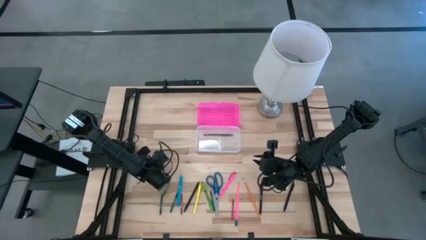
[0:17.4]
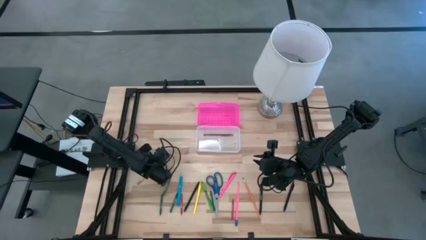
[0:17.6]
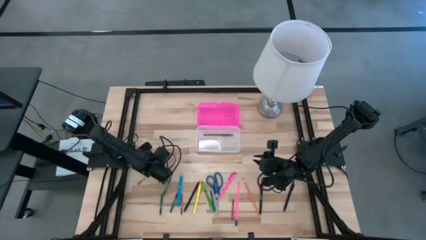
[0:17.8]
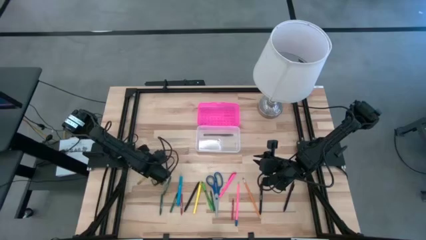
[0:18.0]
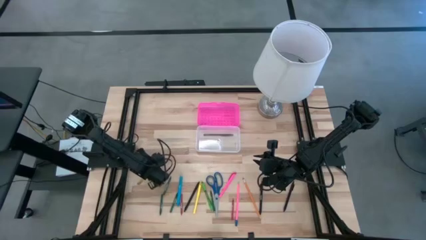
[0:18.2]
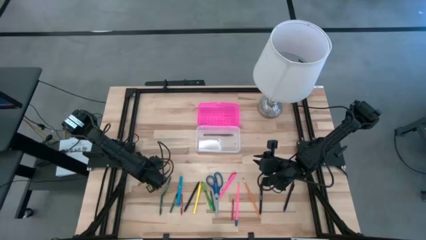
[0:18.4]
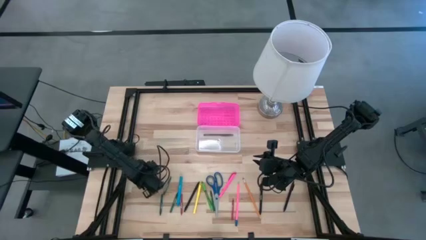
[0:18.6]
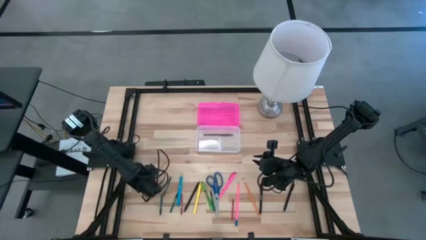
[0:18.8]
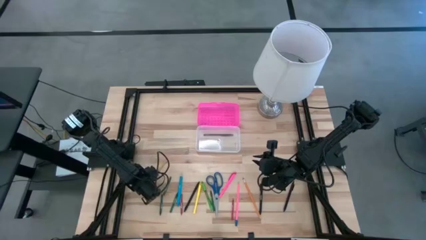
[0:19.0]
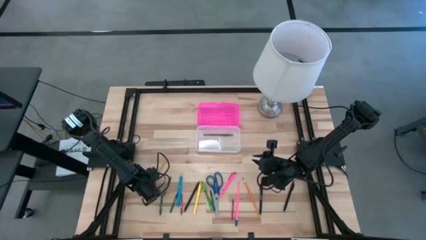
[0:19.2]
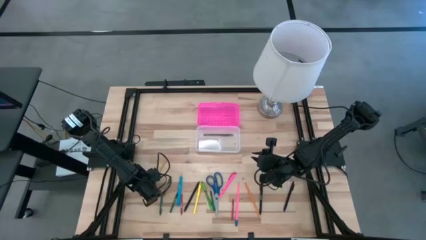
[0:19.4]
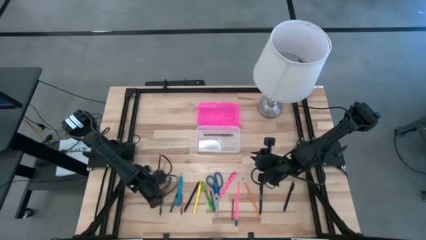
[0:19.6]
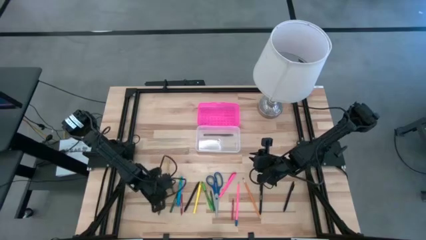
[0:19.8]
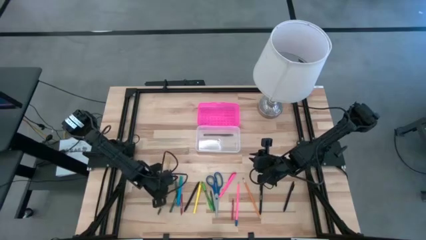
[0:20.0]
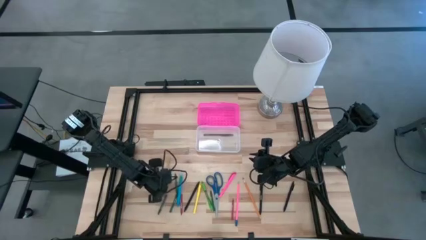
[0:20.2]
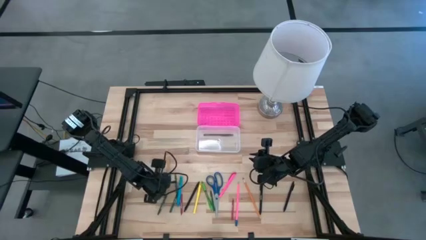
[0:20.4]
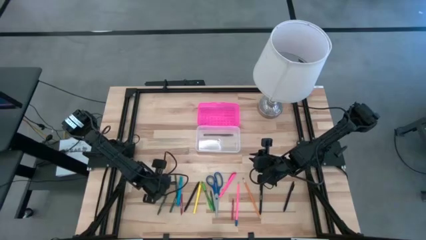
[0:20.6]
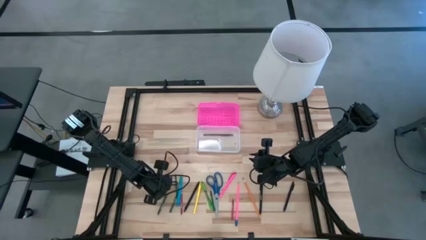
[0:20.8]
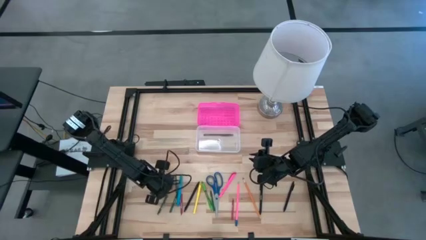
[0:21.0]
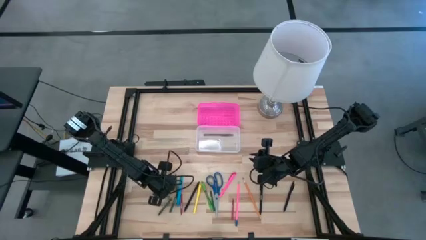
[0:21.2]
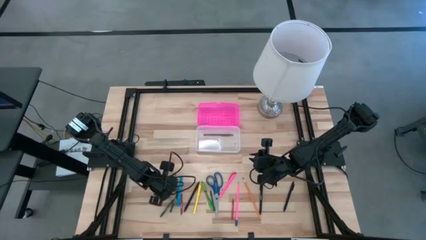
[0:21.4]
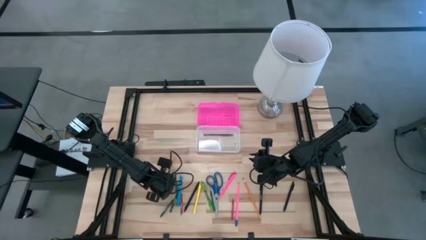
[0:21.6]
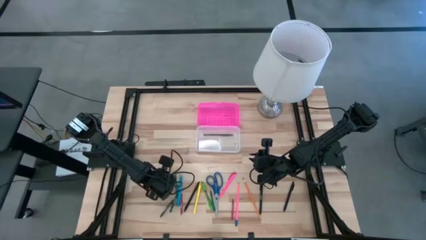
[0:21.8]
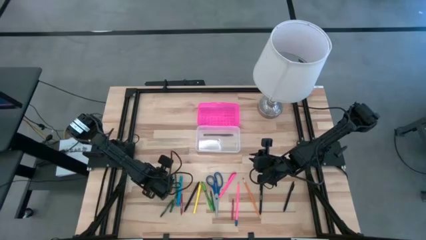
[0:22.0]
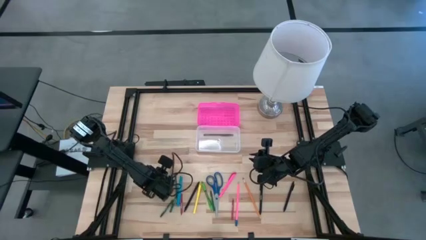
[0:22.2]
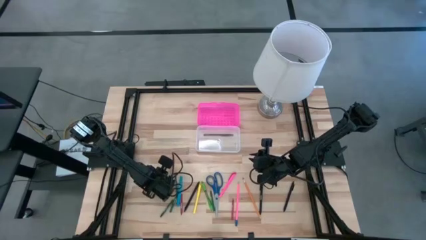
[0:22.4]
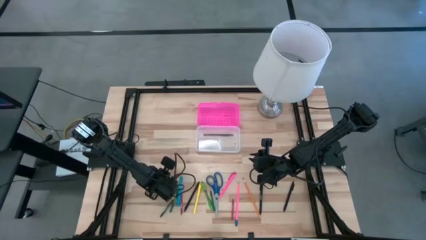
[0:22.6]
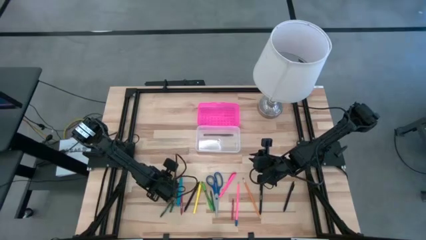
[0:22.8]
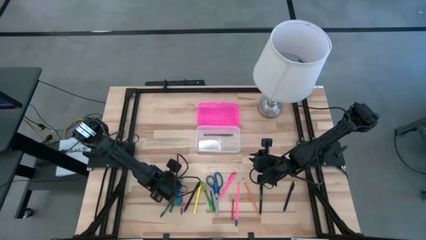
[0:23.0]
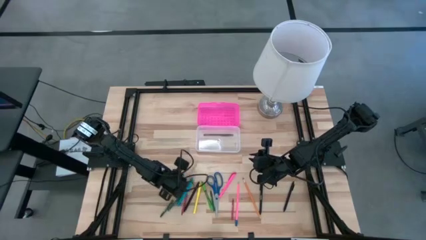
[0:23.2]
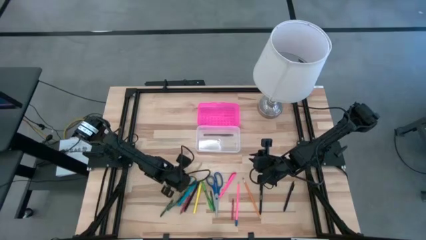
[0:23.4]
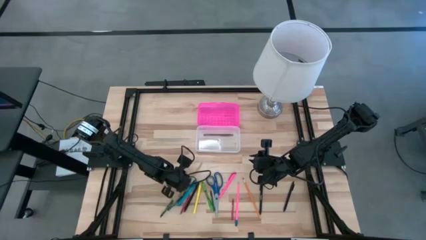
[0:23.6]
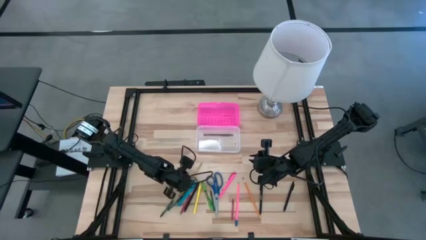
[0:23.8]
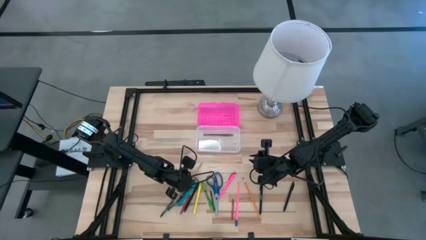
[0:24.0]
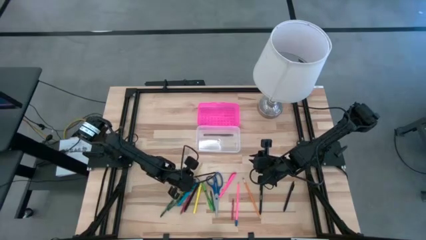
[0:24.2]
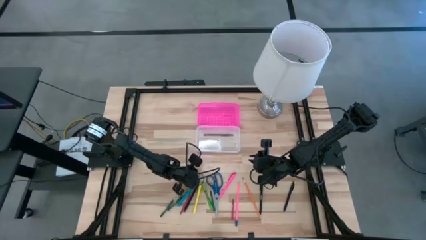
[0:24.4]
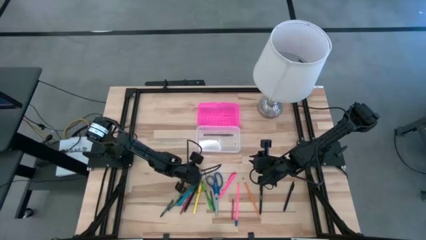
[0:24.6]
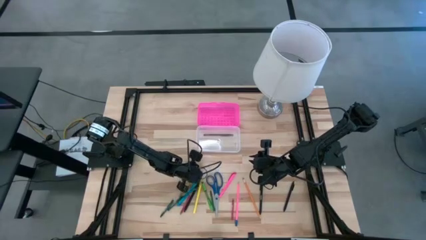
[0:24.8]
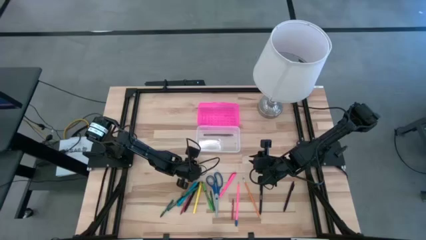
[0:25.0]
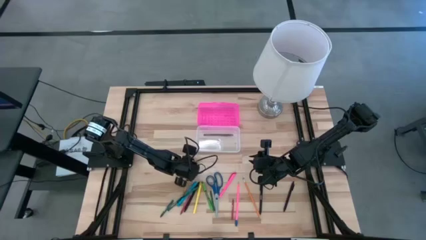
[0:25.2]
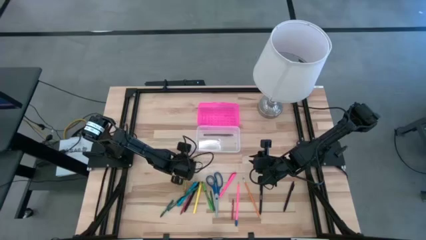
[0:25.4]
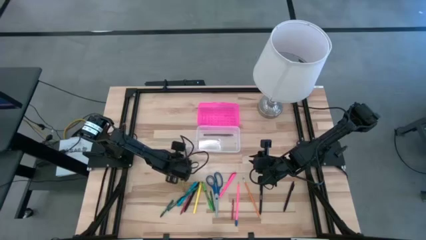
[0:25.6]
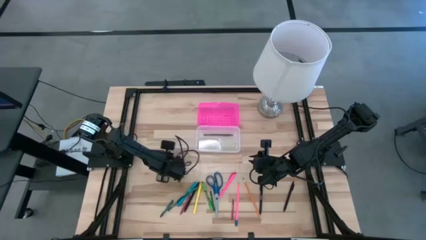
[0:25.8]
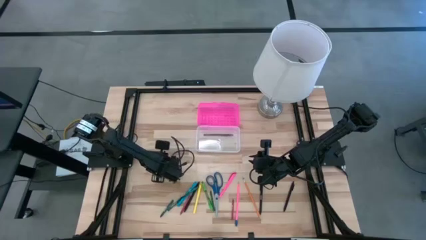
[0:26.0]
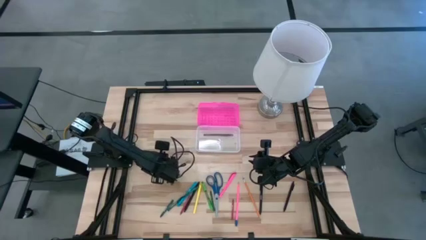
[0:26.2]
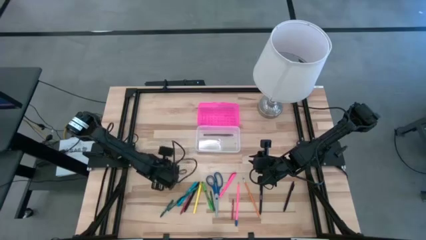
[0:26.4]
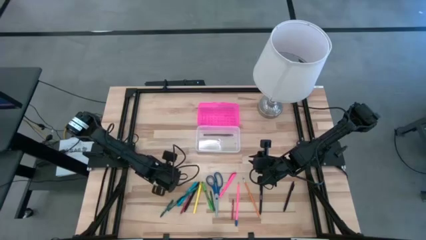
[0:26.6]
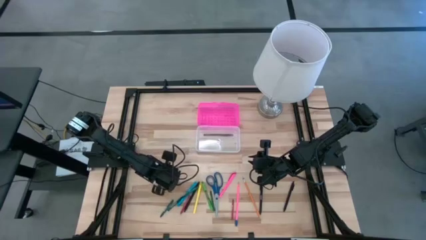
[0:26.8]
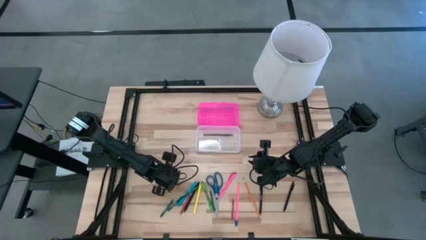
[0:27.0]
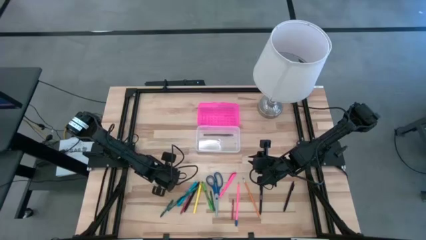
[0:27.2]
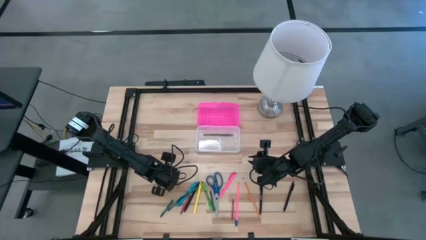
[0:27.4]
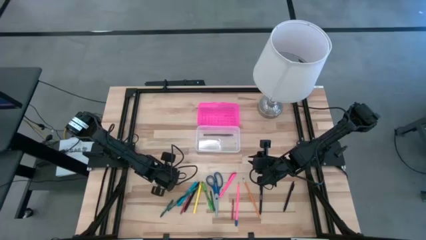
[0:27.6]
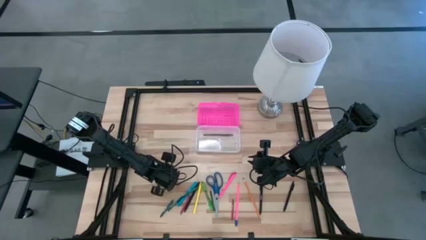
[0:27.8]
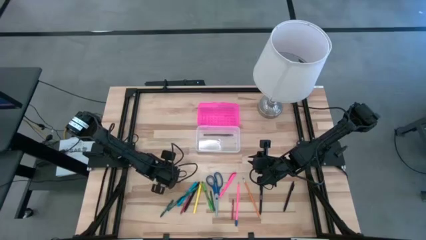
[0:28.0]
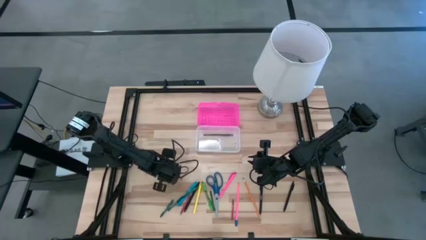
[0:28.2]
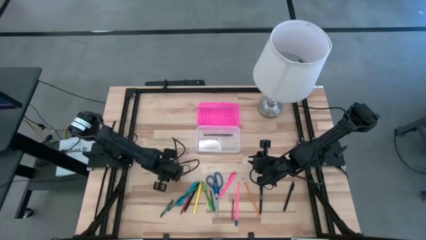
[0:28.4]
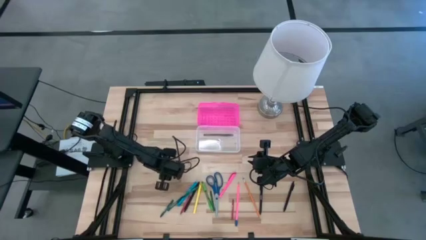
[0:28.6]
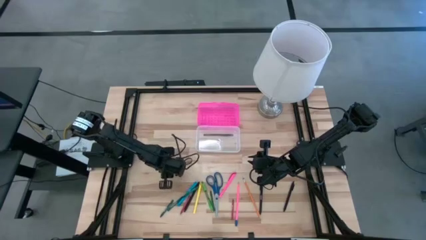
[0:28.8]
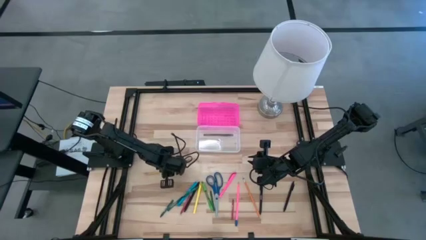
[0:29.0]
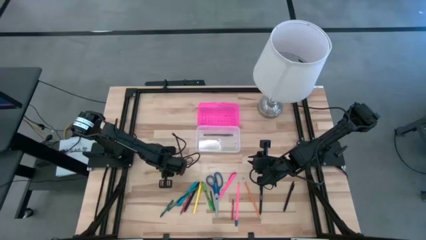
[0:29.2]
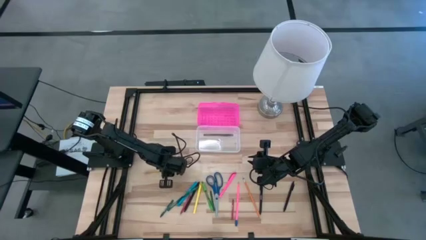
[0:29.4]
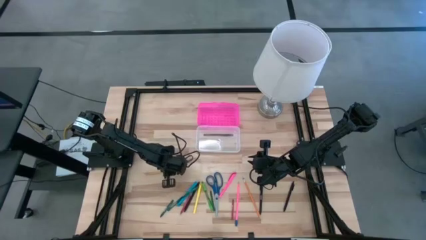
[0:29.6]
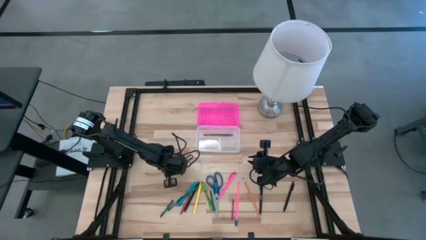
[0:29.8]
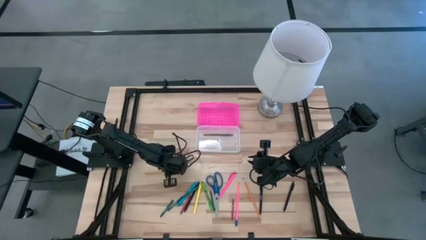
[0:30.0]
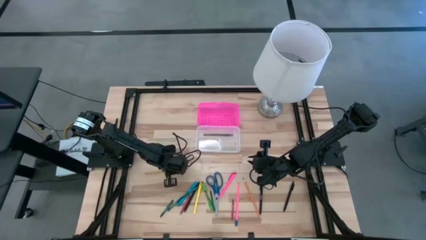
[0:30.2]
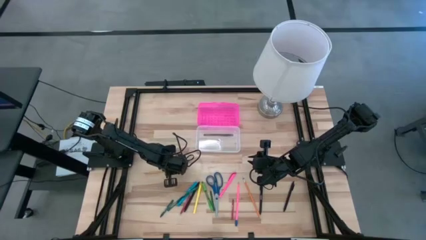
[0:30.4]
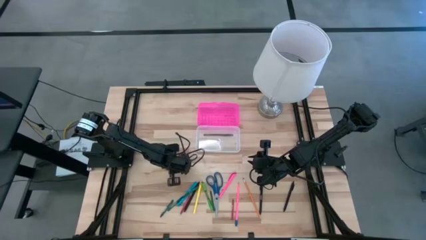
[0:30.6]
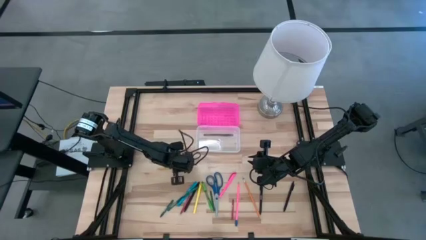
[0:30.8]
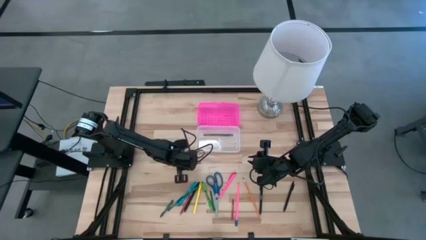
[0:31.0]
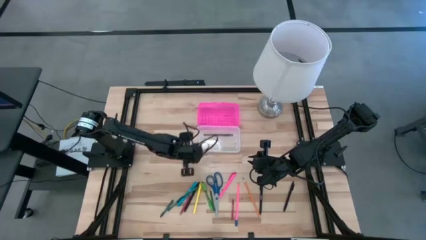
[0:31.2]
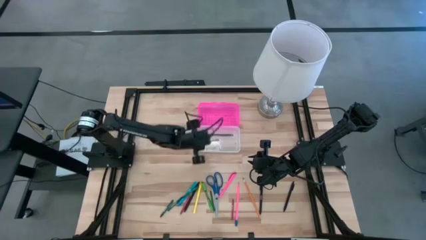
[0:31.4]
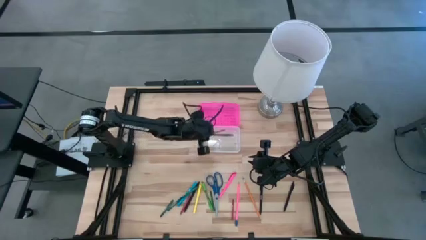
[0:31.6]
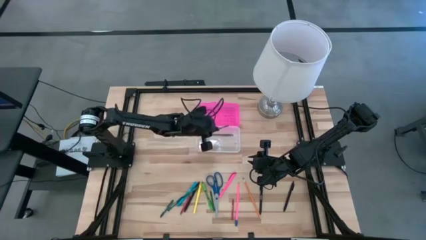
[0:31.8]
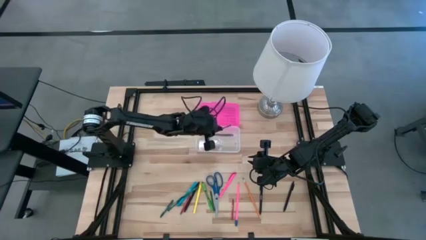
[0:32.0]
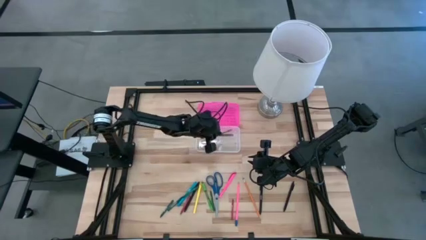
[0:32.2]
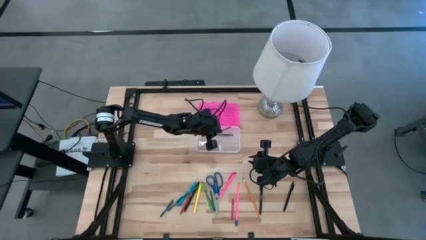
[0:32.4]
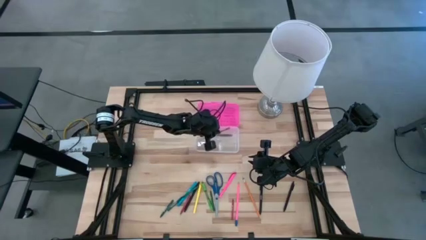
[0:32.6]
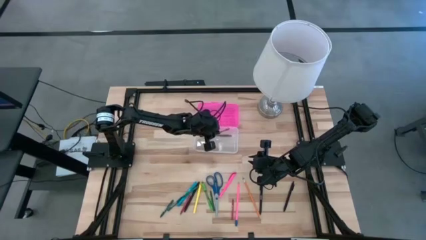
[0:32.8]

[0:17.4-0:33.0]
Task: Pick & place school supplies into a supply box
Put the yellow pencil into the supply box
